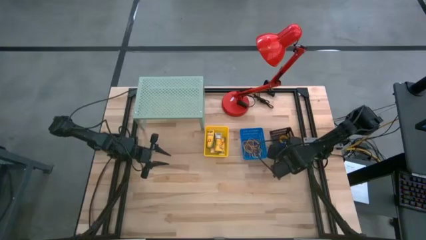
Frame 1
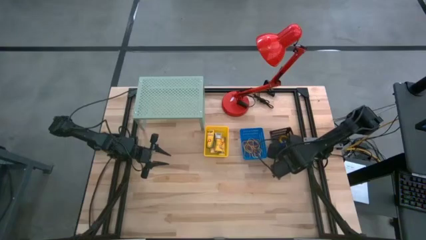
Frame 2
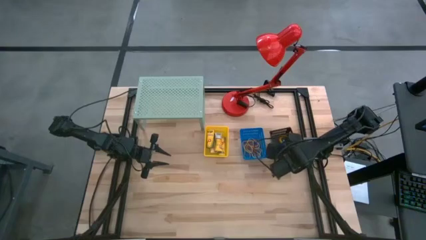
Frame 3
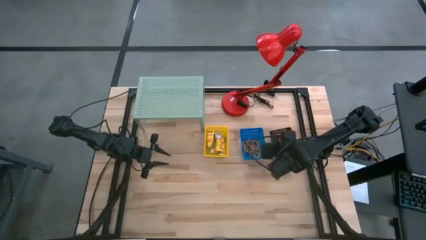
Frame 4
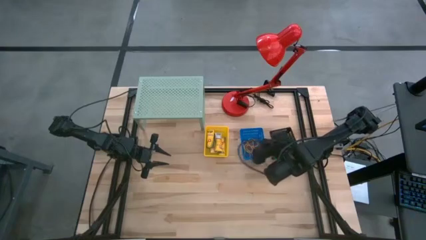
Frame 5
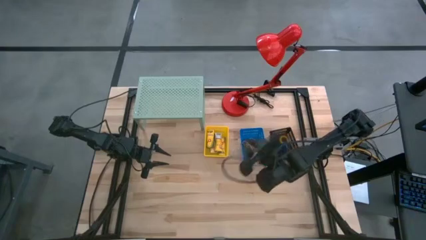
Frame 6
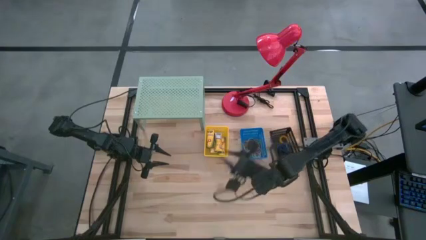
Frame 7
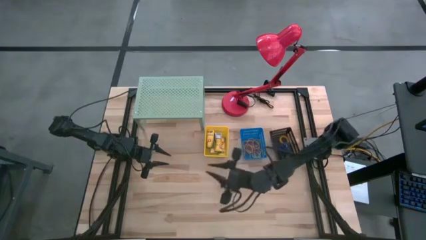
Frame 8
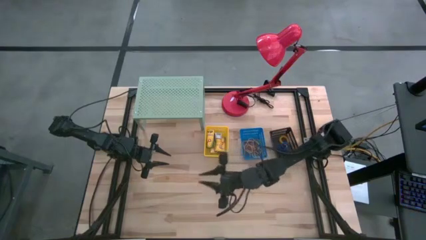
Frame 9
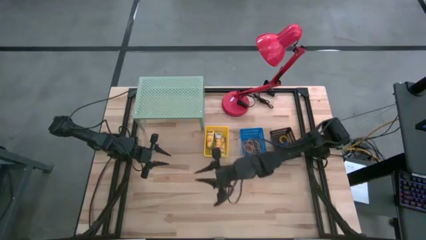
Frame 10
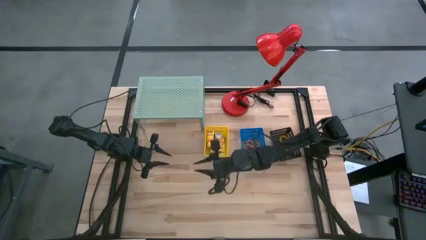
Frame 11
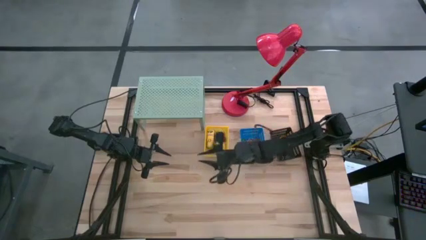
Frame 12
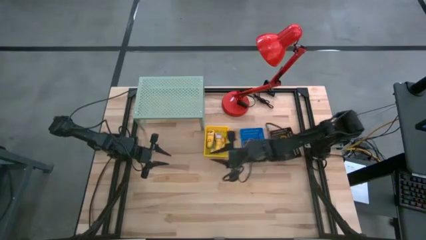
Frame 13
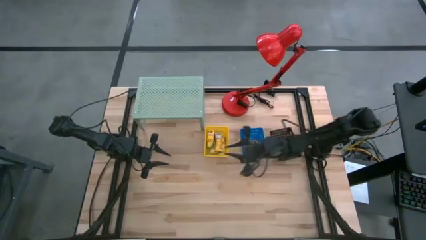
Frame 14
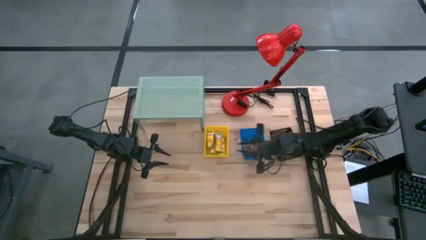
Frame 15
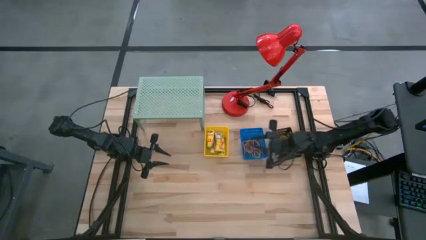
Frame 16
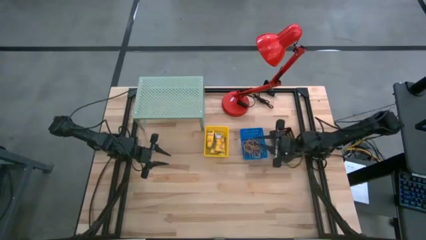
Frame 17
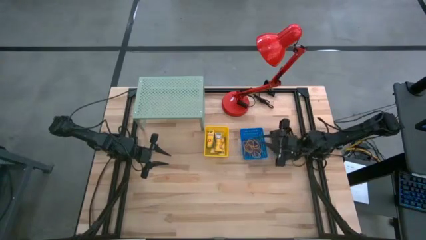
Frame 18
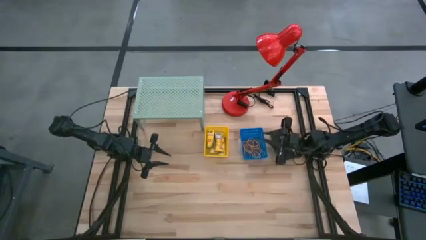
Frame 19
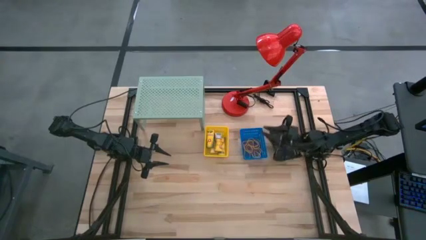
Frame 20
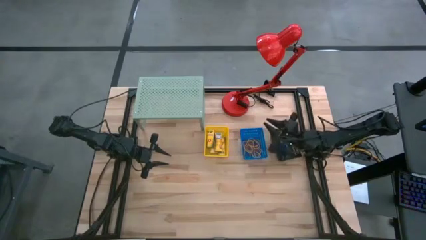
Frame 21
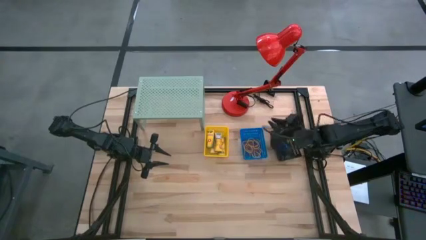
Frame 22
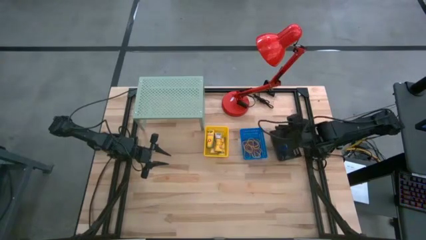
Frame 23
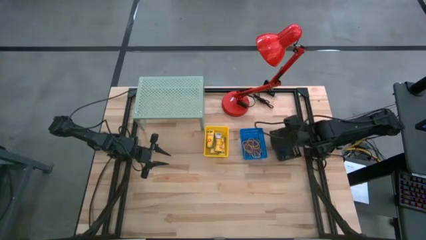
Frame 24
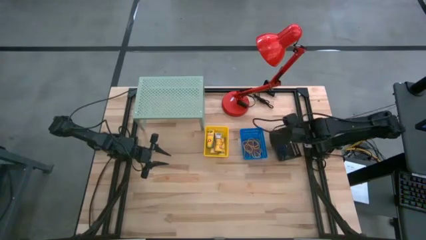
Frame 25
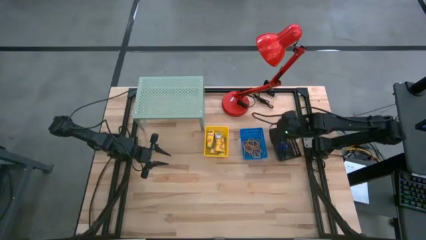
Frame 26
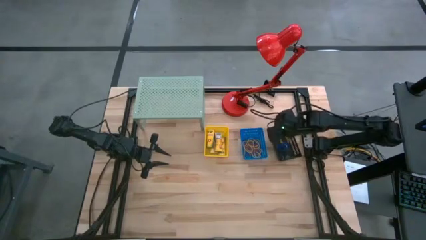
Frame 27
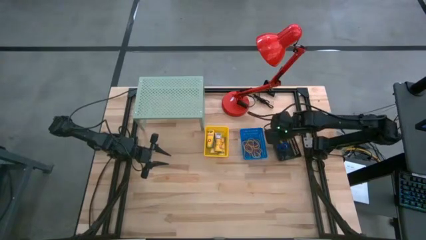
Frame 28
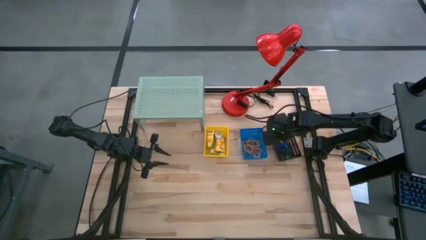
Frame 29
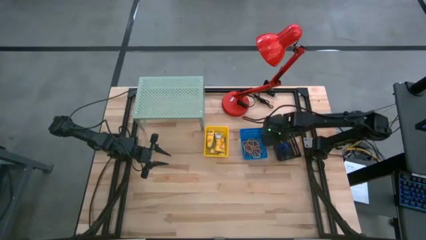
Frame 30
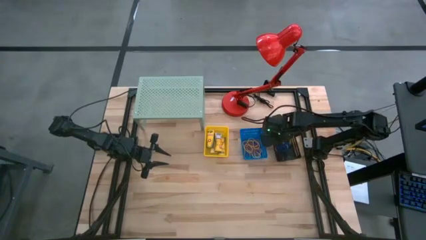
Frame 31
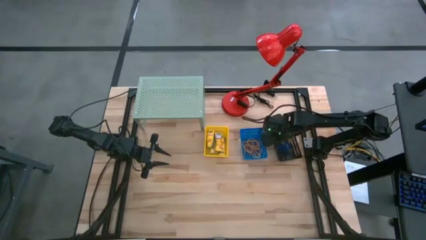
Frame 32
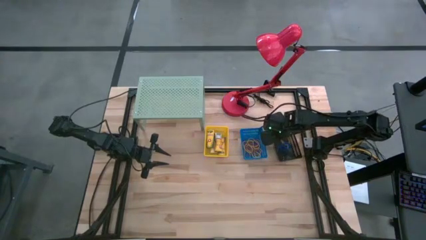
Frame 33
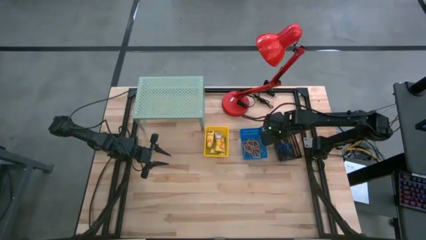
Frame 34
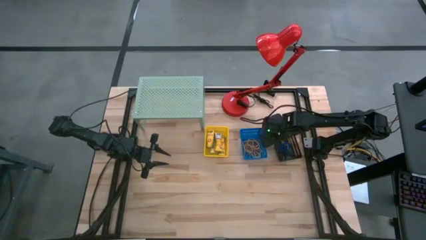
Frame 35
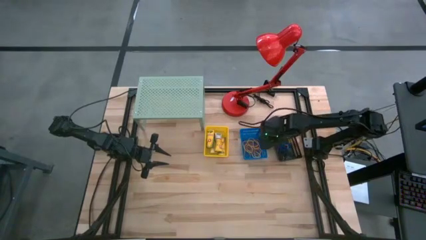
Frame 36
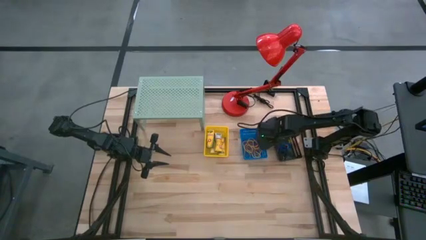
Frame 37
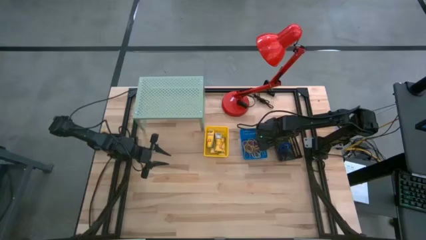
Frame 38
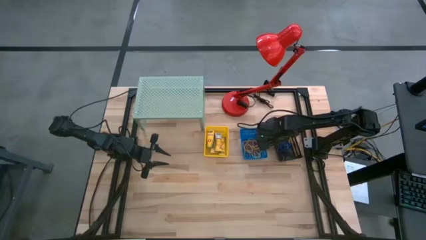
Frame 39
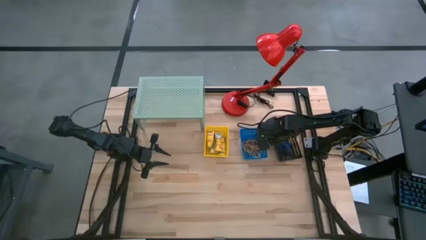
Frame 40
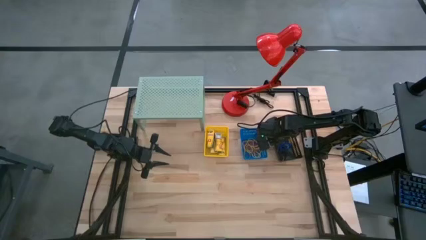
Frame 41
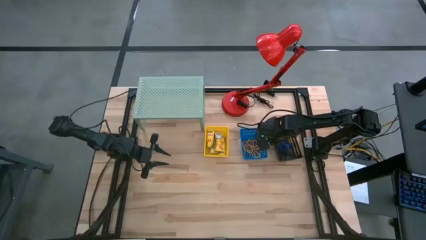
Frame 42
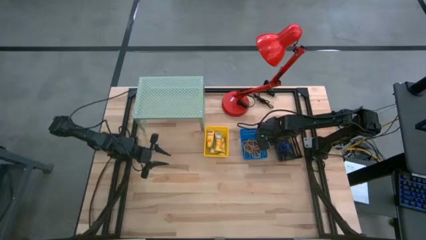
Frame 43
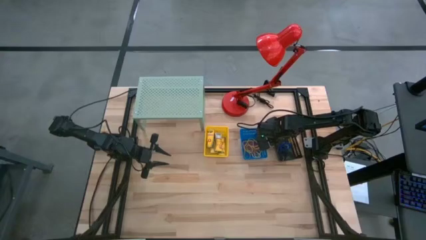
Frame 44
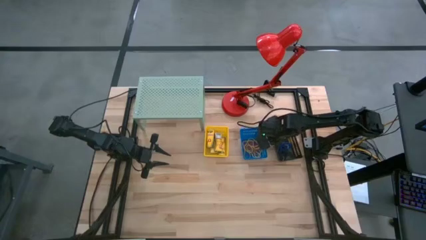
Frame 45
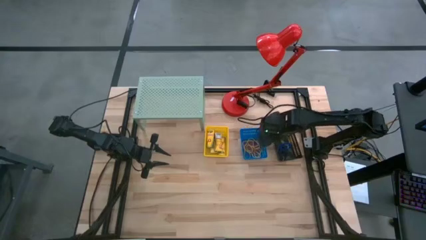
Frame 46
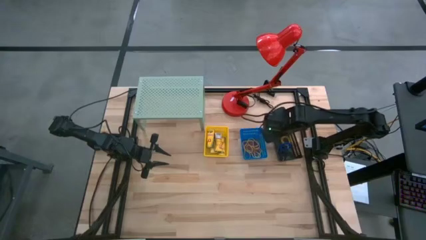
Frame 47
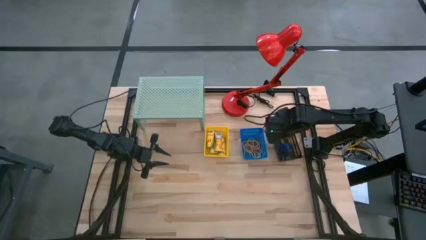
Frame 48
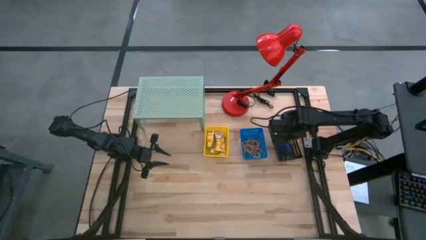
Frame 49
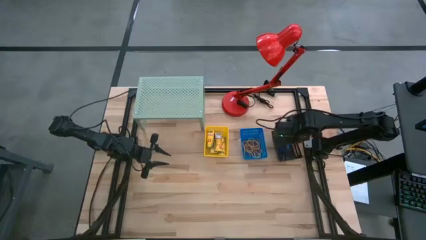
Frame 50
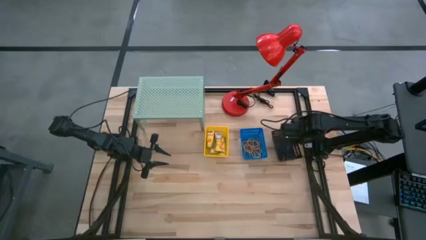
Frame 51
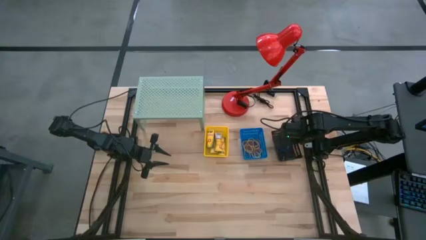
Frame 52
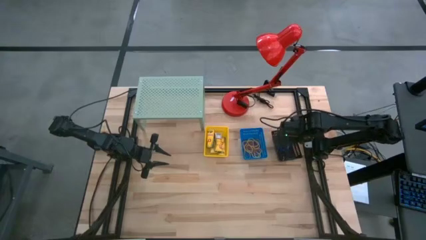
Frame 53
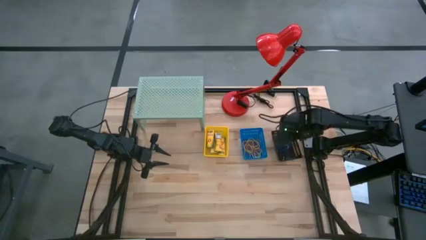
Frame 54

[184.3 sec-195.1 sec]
Task: Pick & Place Office Desk Supplies
Put the black basket filled with spring keychains on the shelf

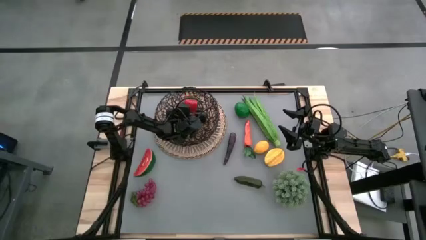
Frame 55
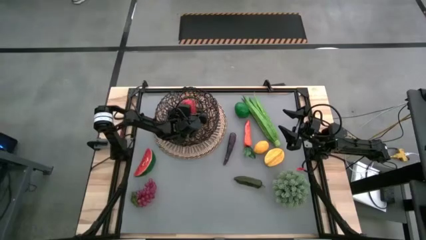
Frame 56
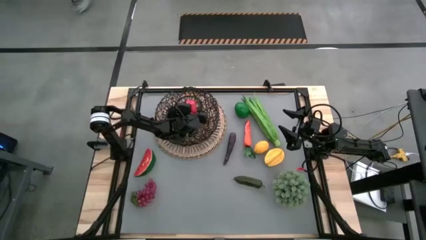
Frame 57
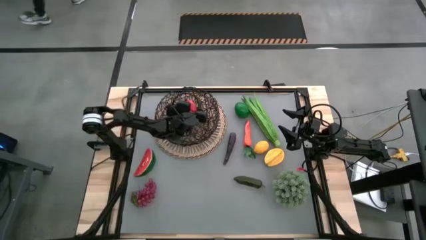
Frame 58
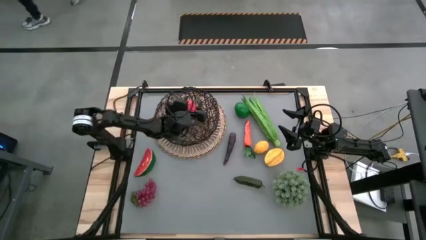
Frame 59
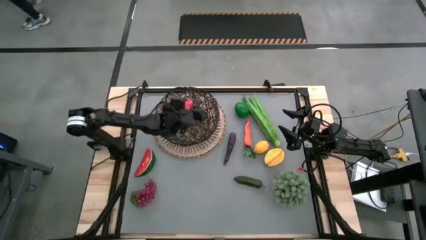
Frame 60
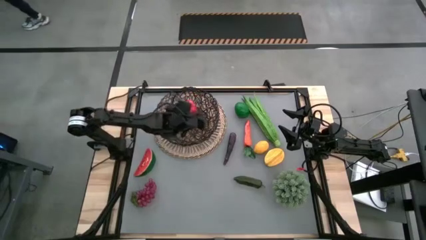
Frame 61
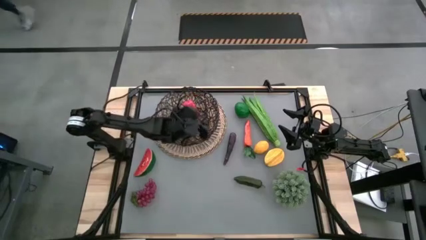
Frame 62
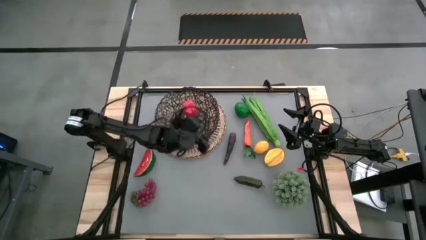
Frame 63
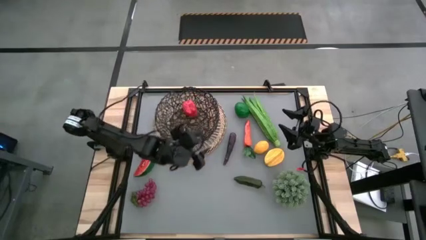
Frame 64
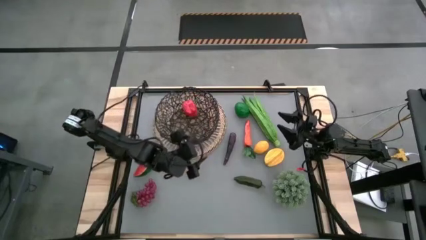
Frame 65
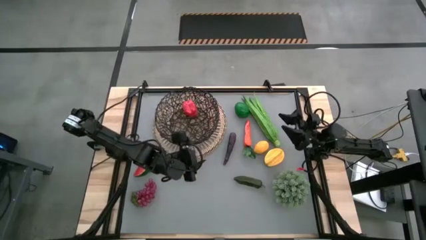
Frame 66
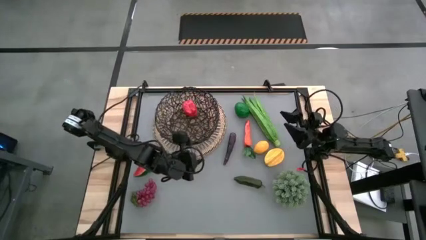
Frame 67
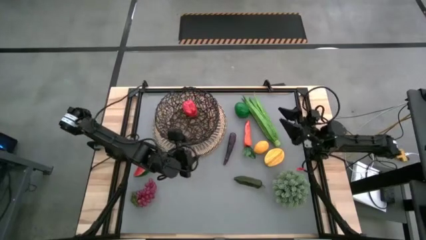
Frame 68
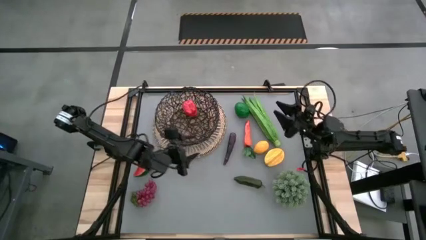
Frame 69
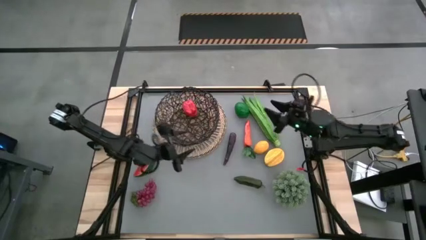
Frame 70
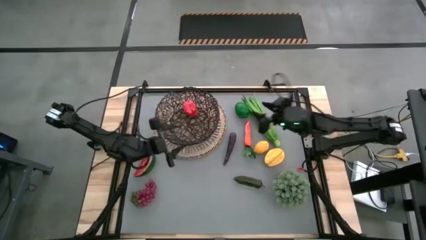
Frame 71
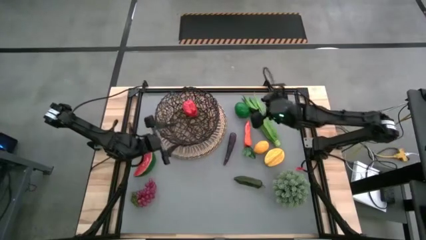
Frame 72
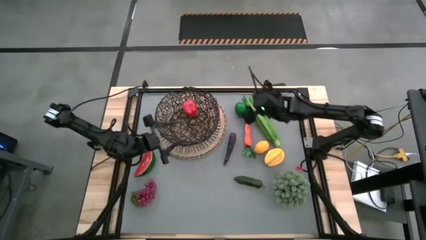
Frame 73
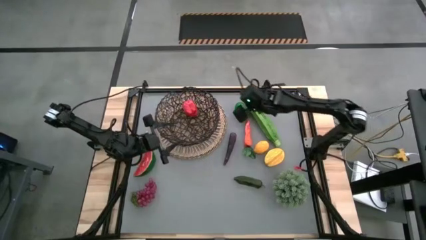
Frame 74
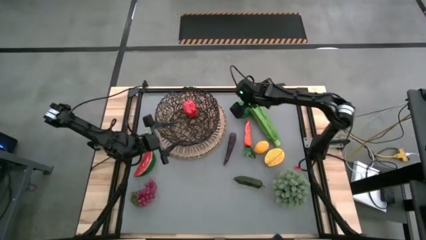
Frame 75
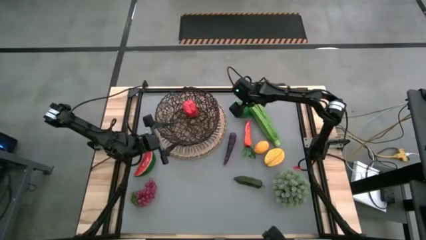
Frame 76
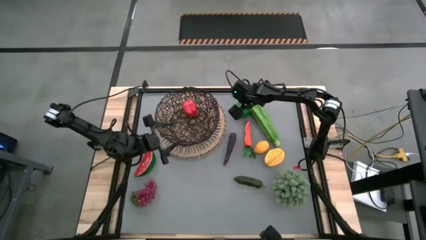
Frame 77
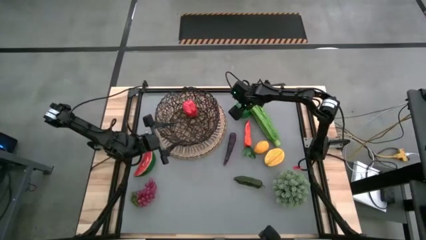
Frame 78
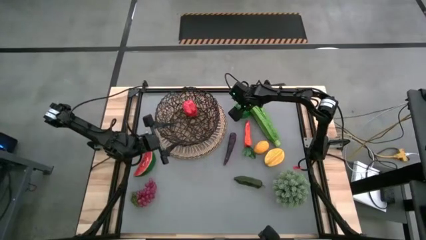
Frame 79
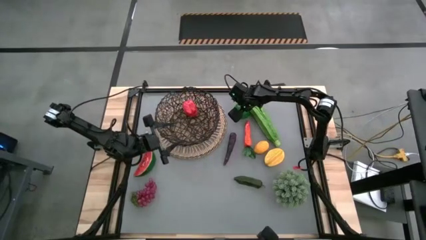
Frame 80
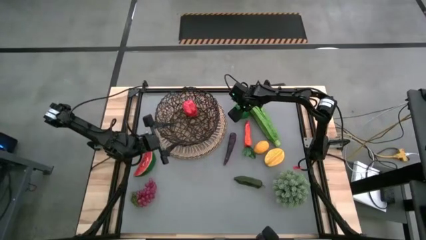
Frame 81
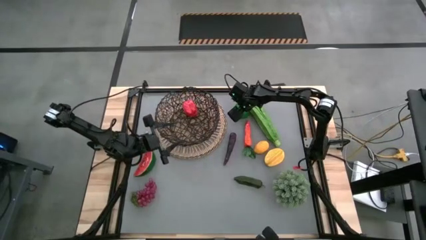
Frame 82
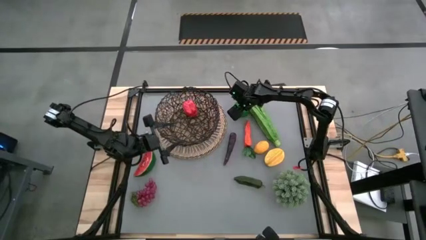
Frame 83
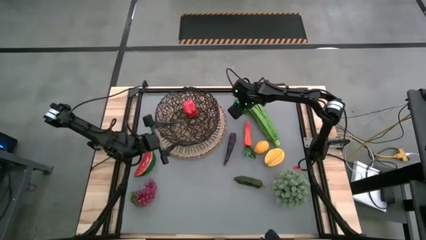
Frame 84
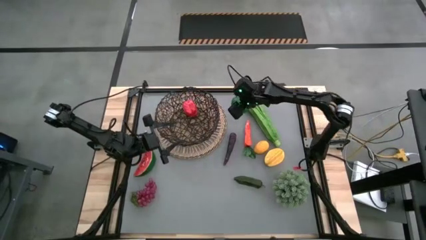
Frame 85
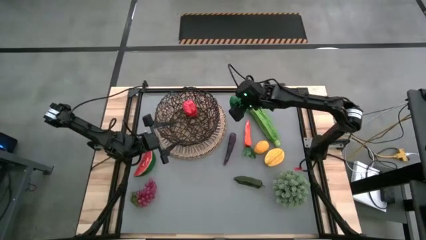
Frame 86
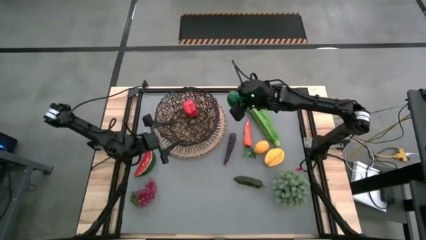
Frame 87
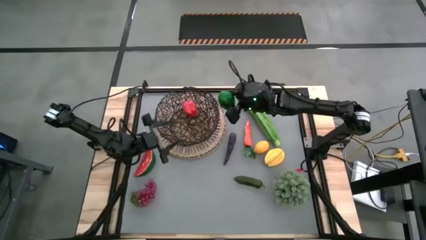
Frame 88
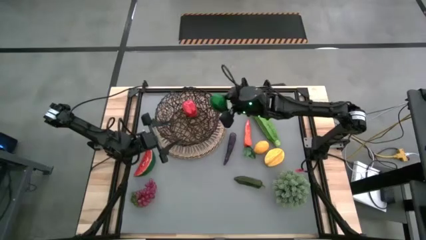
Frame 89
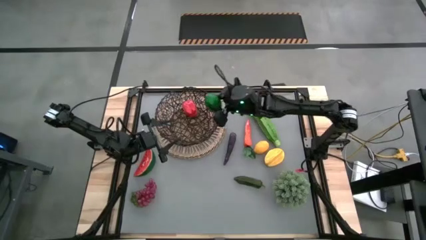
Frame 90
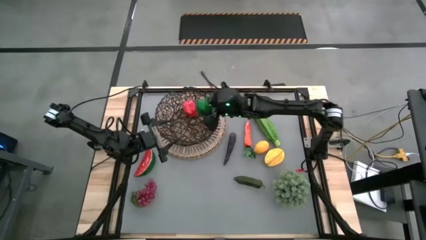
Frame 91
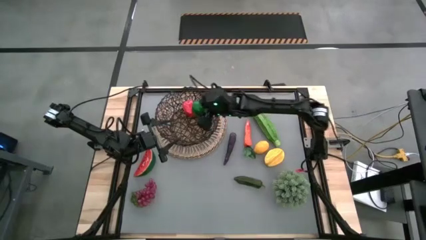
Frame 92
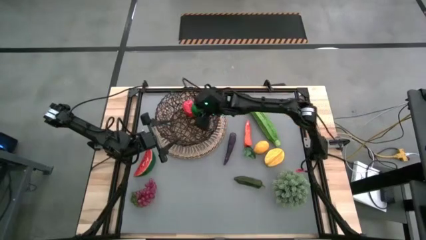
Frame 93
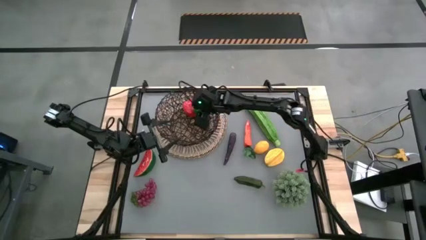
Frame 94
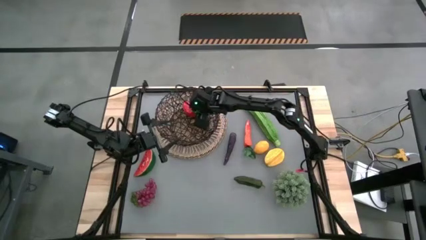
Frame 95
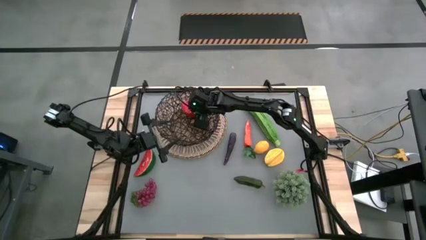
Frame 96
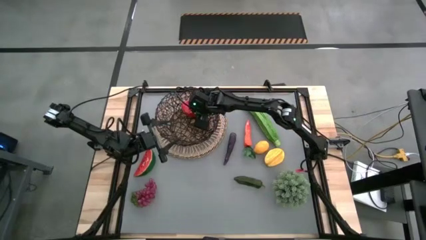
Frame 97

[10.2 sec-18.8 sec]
Task: Build produce basket
Put the green lime into the black wire basket
